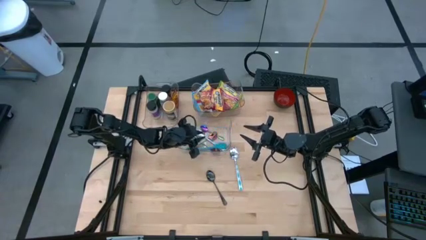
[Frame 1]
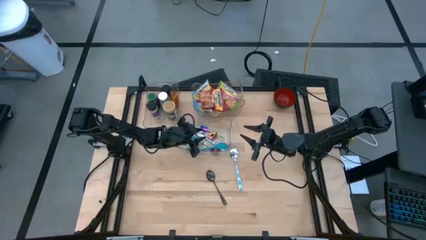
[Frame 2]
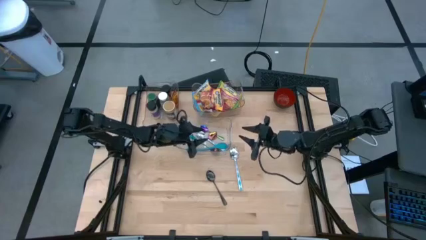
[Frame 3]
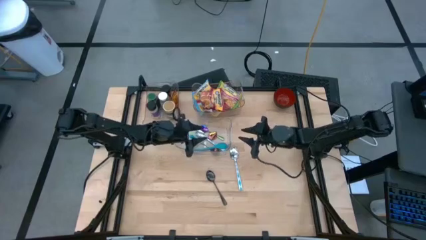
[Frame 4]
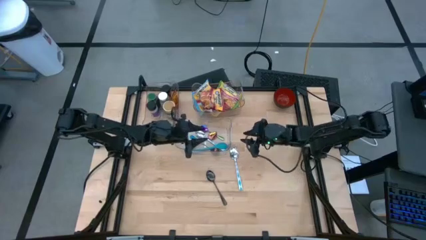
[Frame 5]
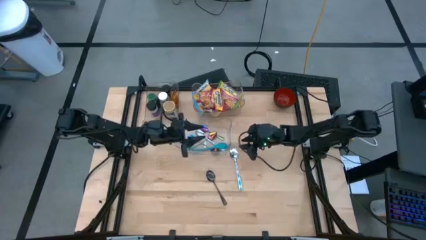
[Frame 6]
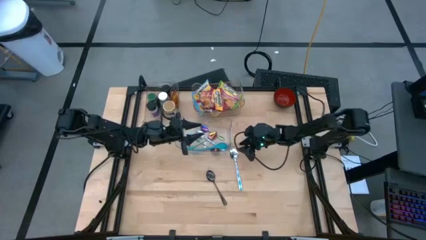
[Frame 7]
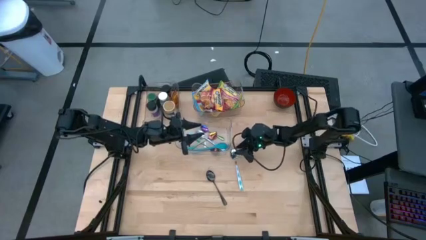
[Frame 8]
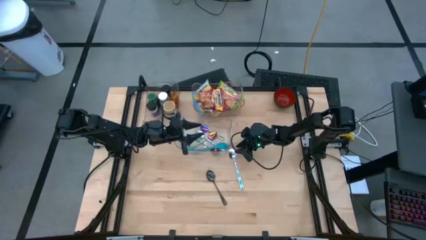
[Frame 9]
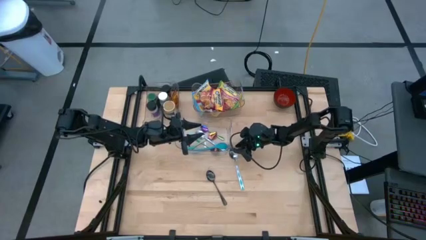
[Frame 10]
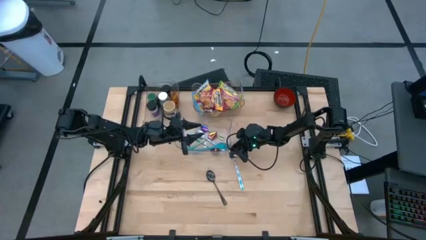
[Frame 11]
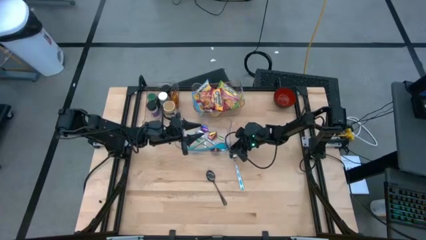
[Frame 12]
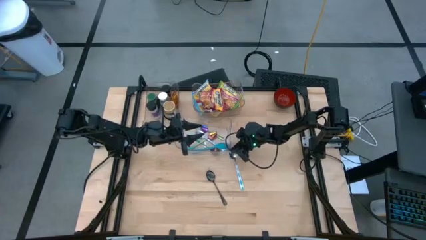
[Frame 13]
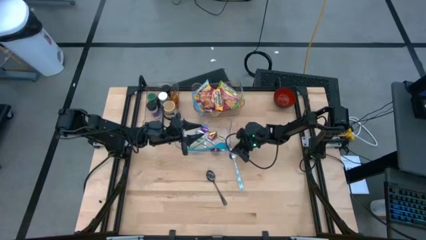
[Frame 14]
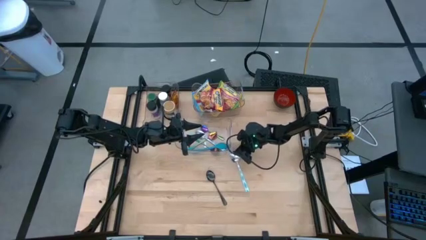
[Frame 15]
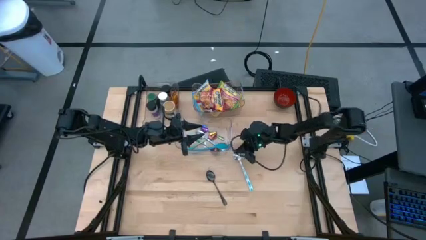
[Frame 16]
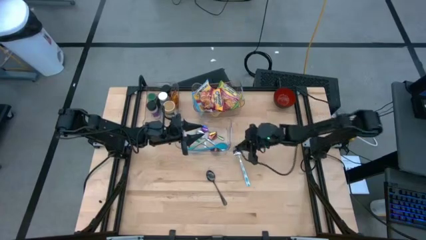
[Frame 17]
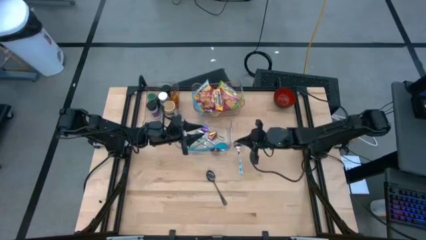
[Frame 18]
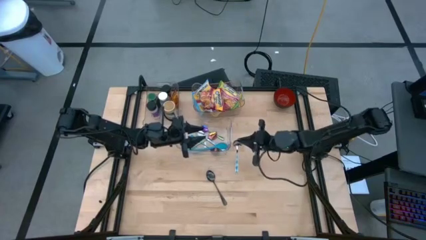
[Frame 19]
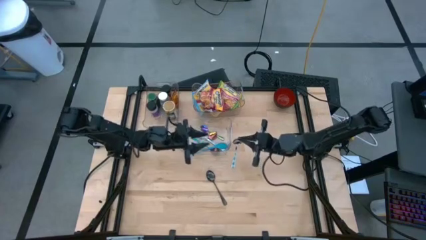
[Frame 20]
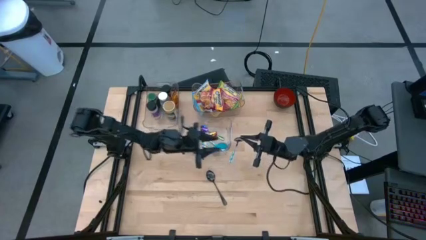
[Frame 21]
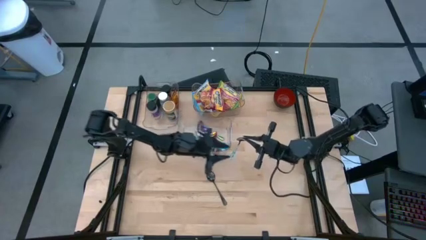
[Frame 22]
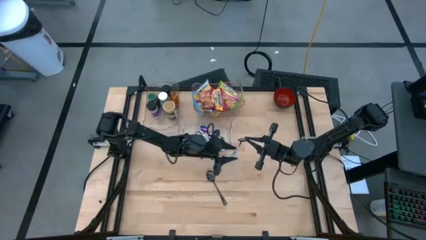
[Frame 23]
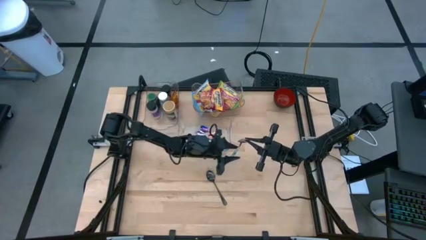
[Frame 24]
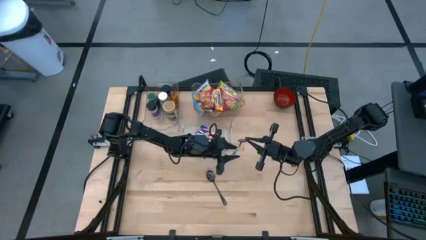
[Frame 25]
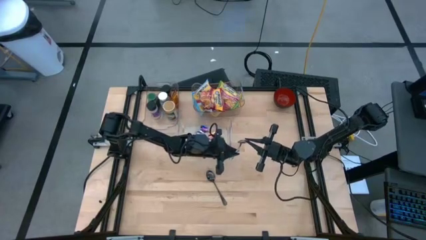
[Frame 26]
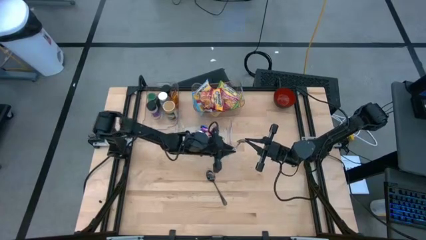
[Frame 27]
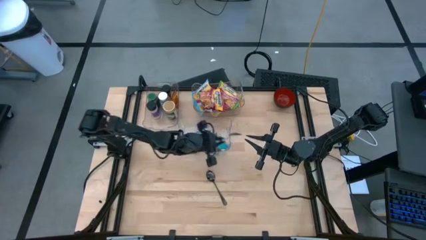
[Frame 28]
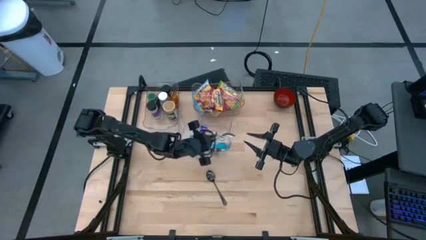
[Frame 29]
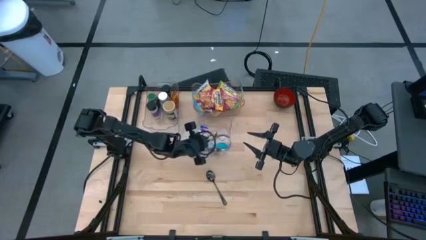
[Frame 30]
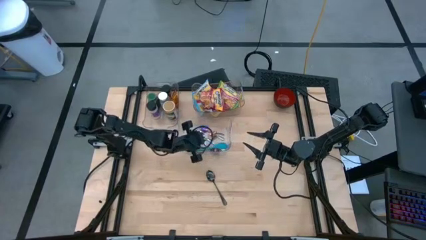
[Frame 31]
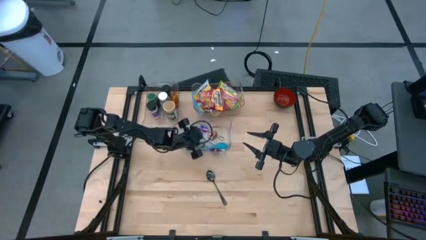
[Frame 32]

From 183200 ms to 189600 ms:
Task: Pick & Place Food Item
Put the blue and white spoon into the bottom transparent bin

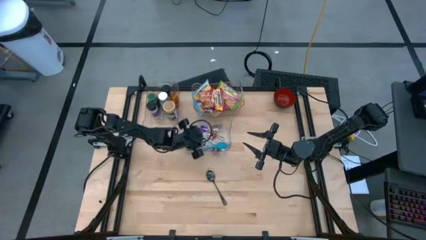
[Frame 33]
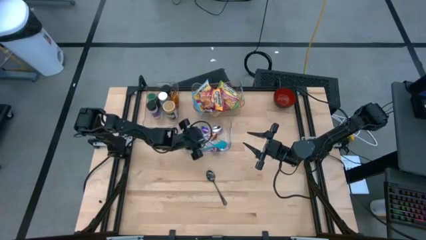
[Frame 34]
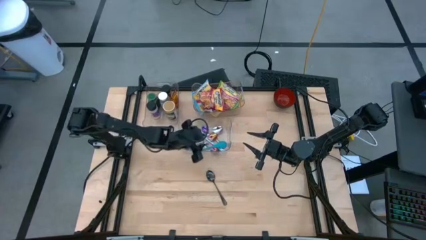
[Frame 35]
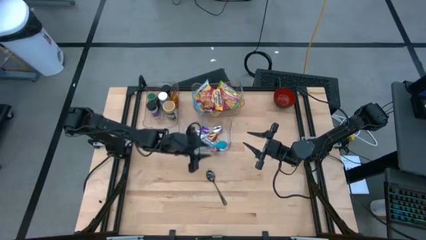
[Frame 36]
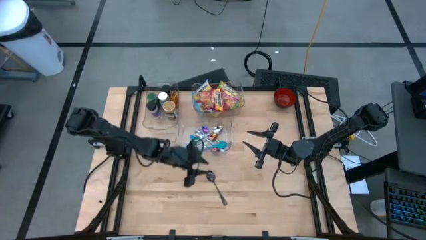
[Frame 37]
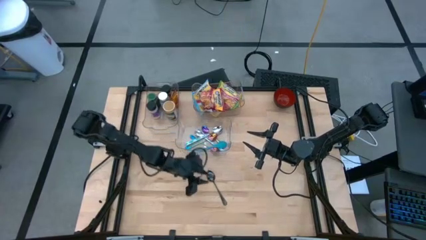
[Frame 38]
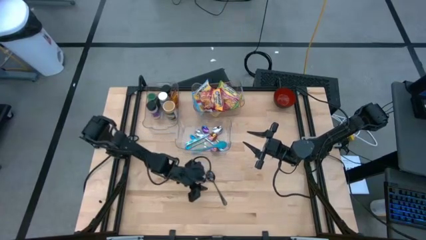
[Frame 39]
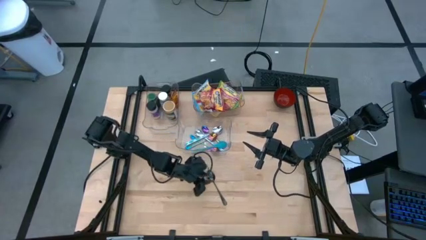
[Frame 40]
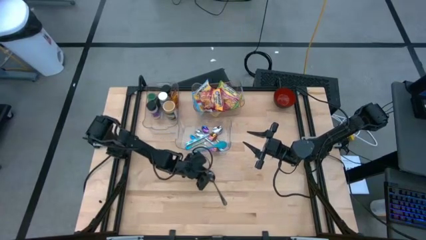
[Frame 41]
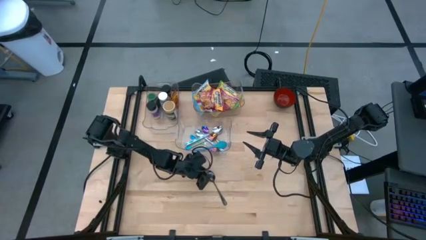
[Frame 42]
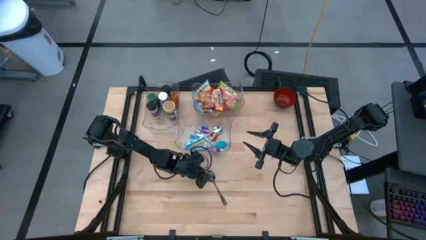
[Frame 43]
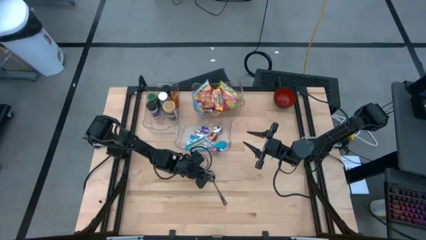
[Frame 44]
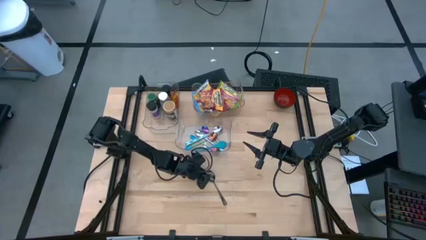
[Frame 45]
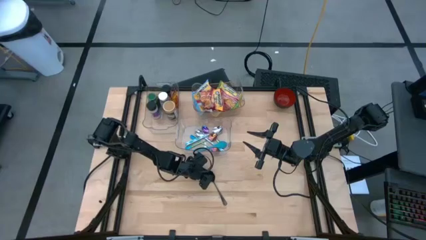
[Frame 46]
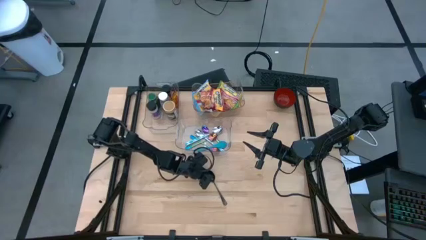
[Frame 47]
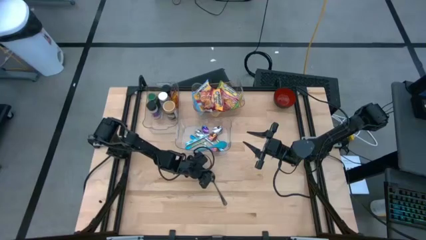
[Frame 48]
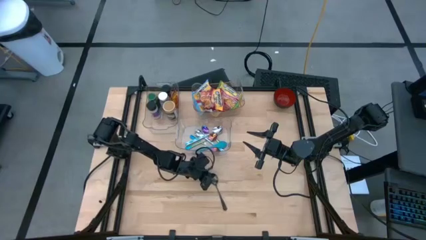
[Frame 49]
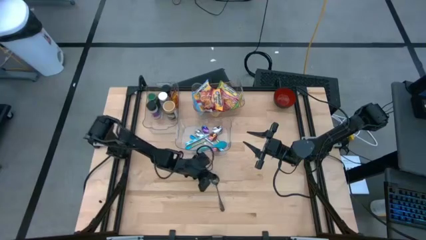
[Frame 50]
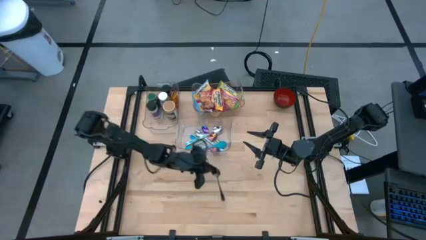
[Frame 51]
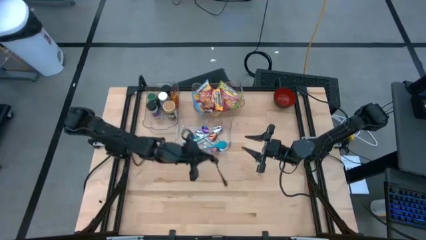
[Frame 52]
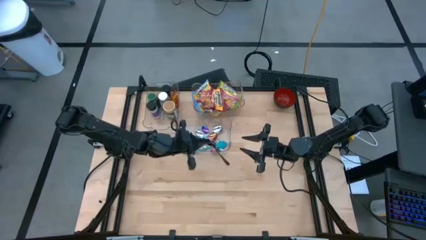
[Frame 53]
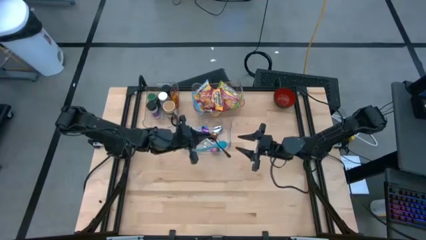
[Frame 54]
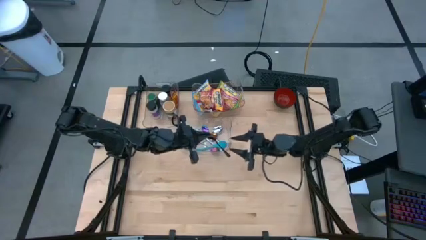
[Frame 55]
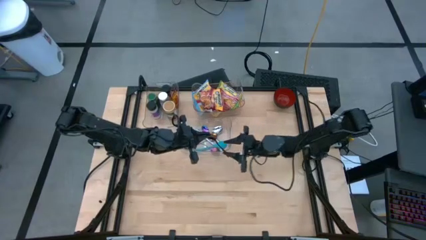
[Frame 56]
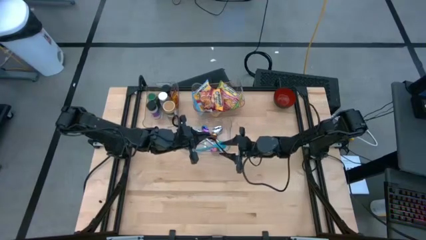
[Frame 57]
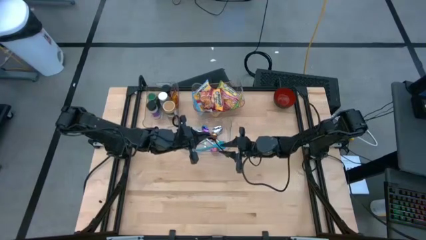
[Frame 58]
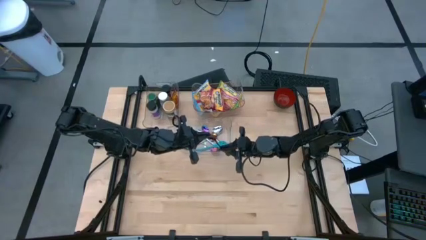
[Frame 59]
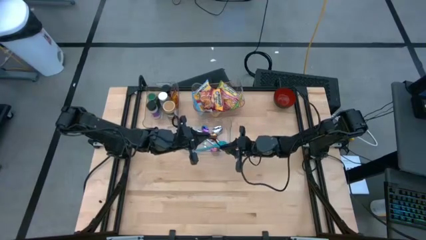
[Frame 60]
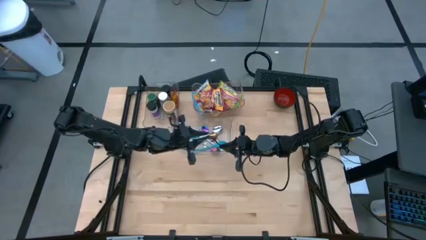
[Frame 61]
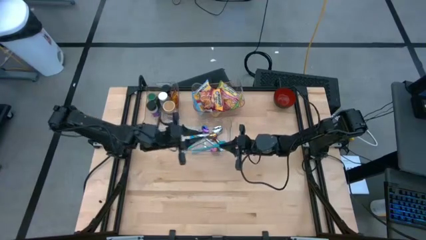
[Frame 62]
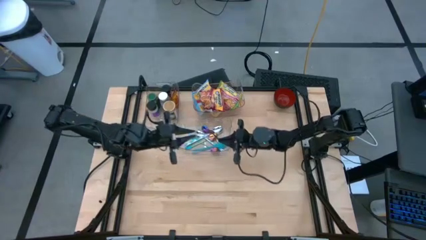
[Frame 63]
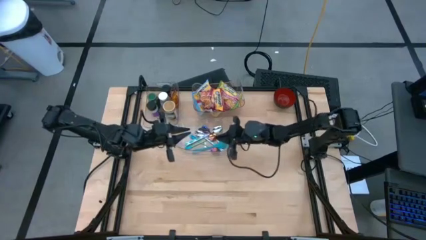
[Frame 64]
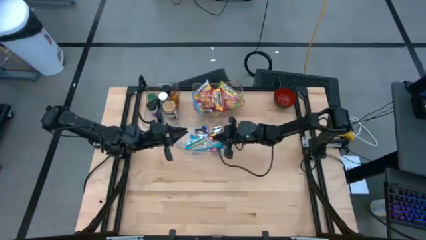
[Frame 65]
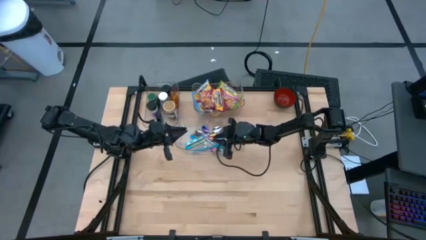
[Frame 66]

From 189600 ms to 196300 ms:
Put the black spoon into the bottom transparent bin
